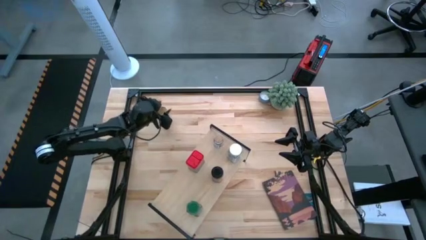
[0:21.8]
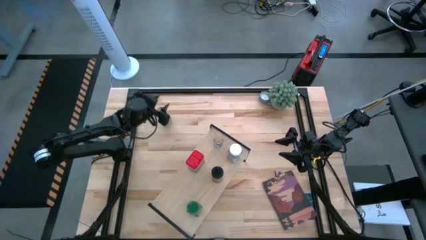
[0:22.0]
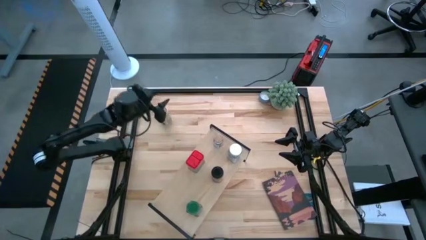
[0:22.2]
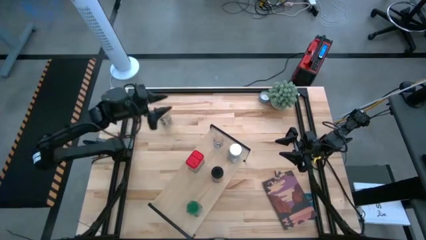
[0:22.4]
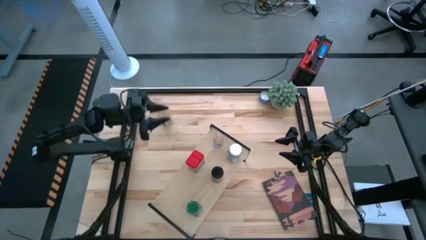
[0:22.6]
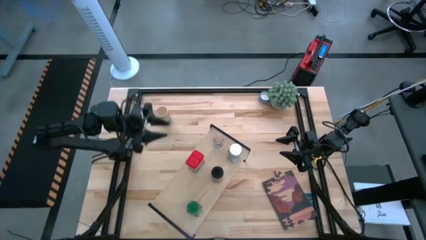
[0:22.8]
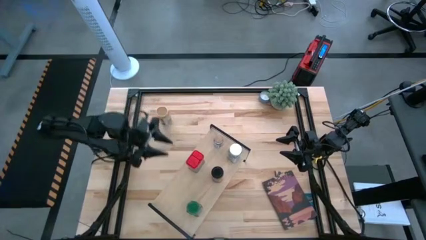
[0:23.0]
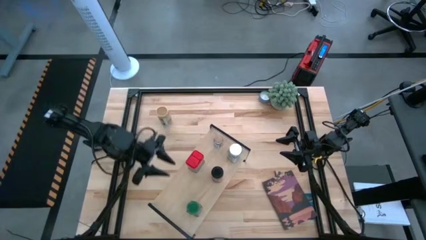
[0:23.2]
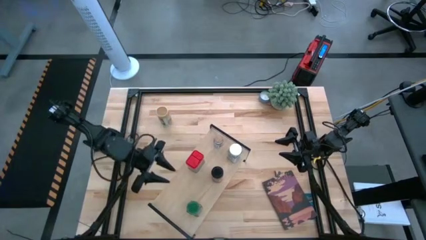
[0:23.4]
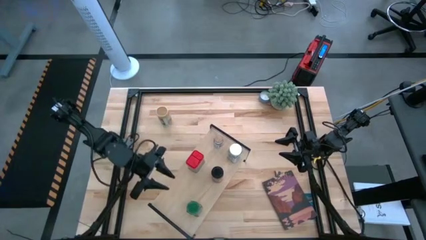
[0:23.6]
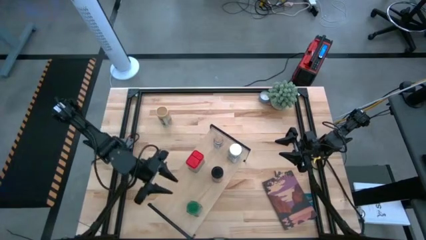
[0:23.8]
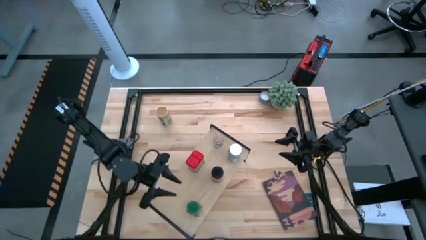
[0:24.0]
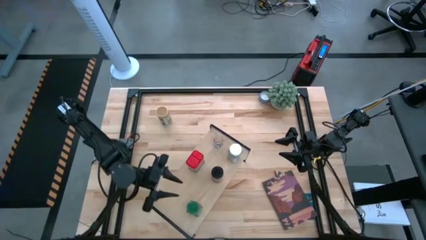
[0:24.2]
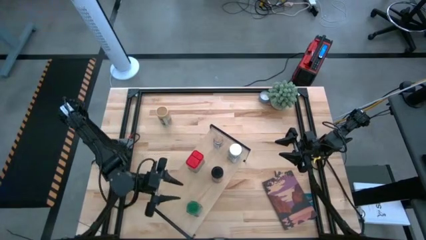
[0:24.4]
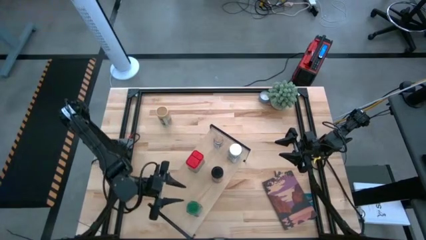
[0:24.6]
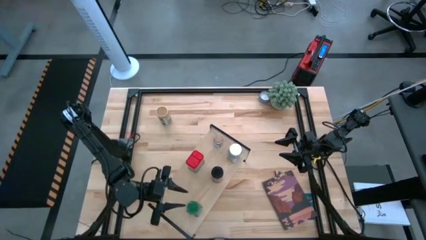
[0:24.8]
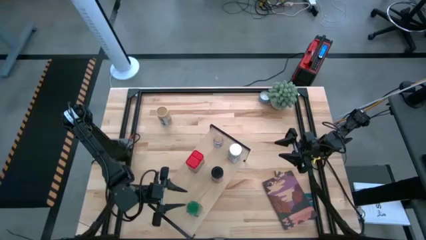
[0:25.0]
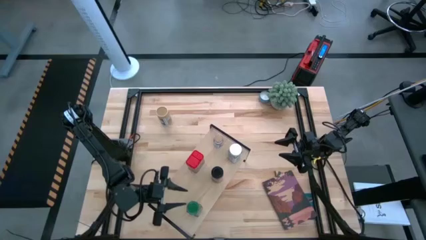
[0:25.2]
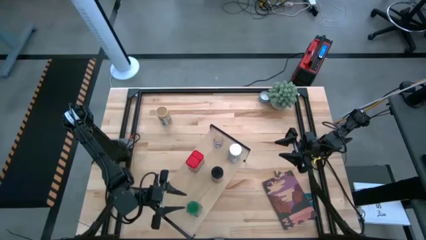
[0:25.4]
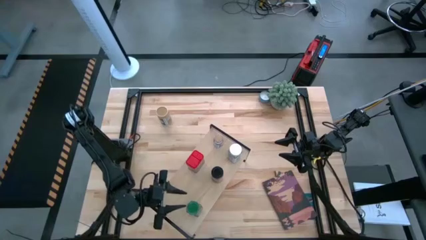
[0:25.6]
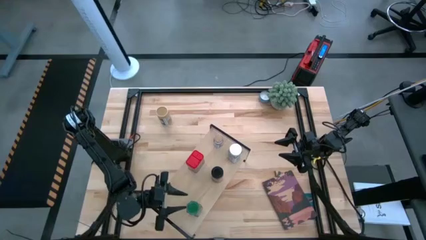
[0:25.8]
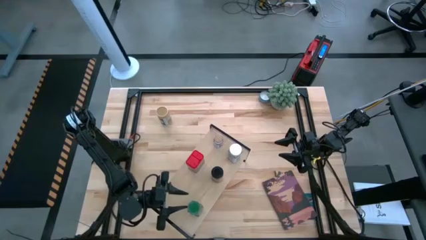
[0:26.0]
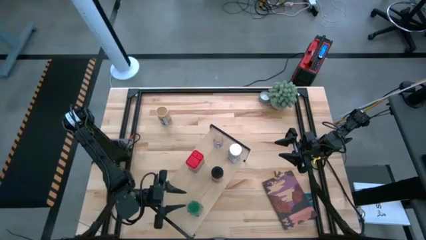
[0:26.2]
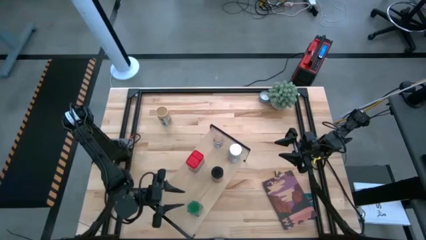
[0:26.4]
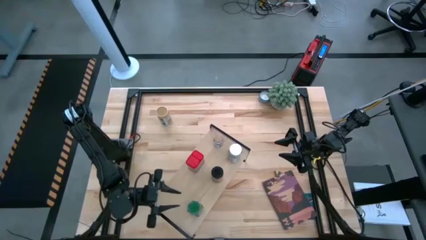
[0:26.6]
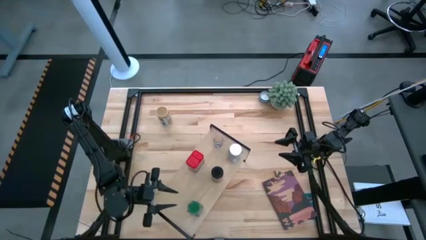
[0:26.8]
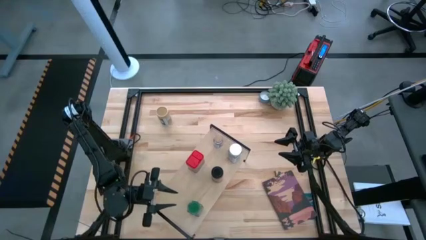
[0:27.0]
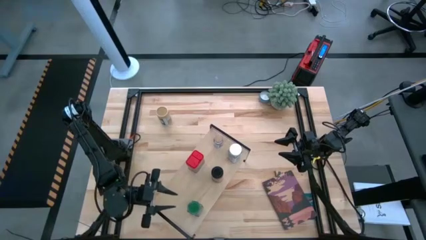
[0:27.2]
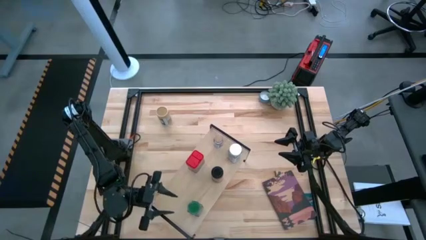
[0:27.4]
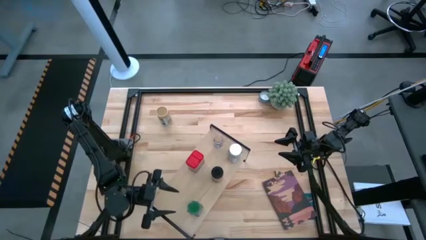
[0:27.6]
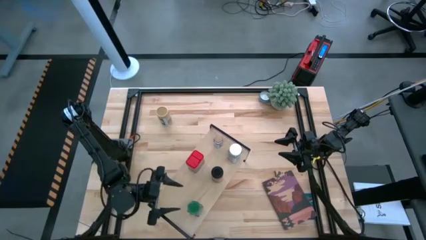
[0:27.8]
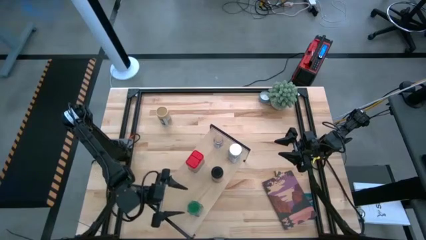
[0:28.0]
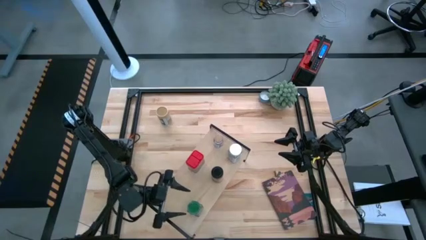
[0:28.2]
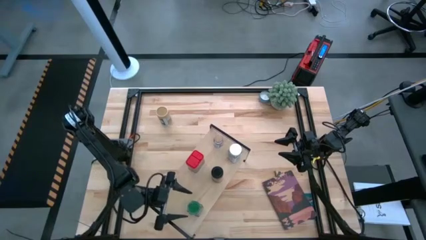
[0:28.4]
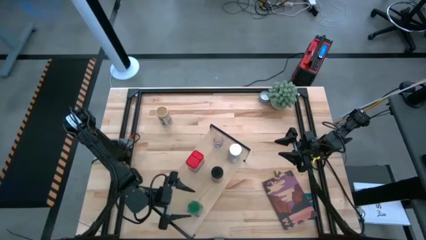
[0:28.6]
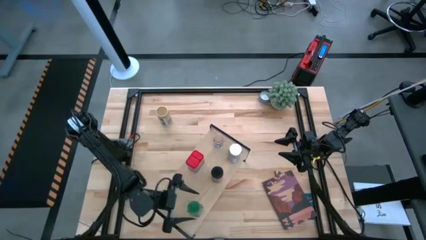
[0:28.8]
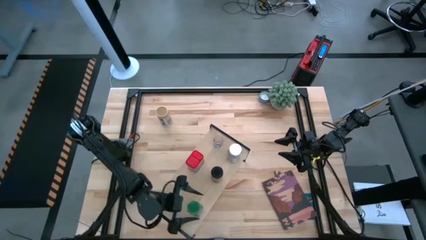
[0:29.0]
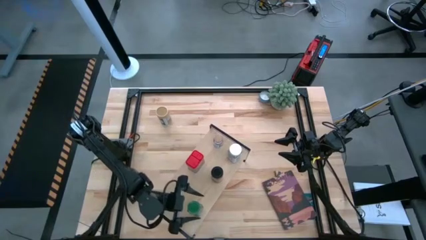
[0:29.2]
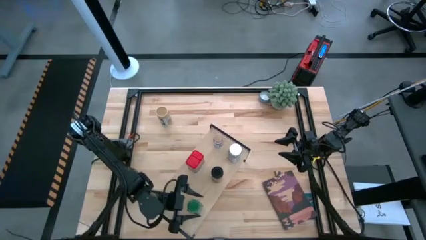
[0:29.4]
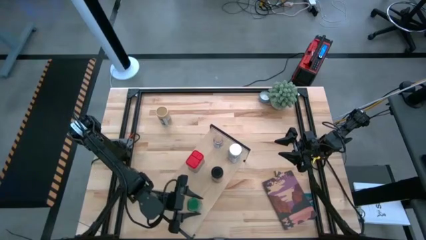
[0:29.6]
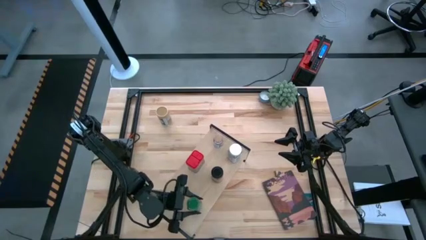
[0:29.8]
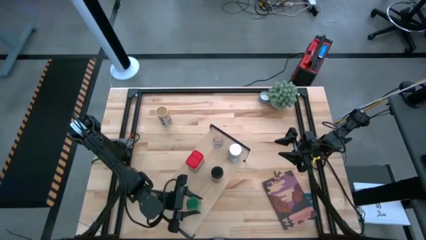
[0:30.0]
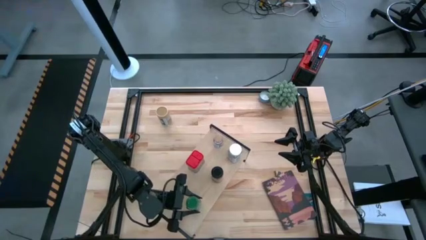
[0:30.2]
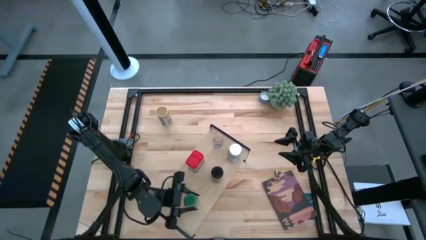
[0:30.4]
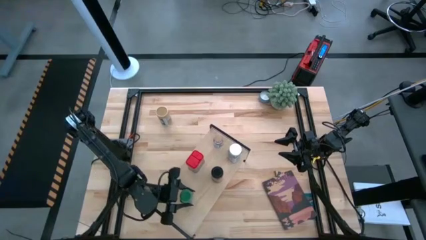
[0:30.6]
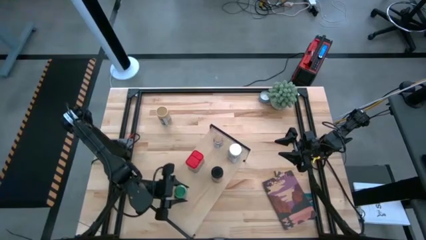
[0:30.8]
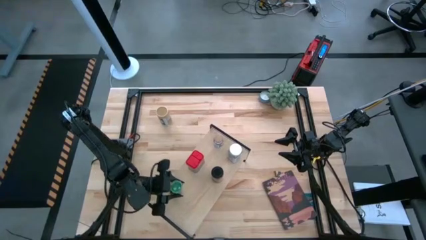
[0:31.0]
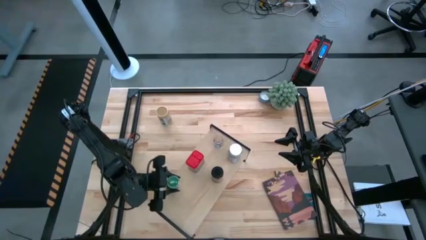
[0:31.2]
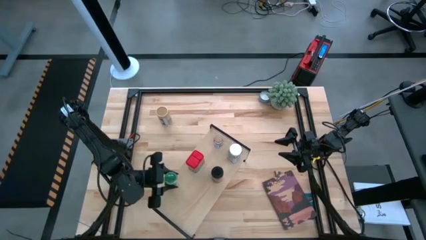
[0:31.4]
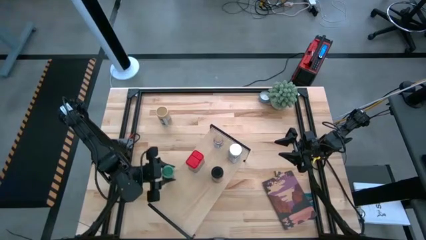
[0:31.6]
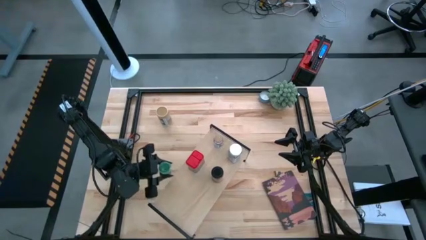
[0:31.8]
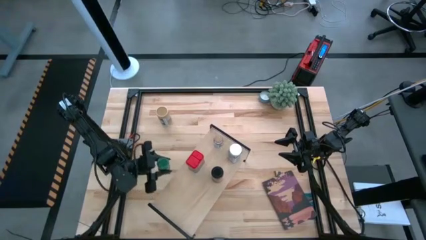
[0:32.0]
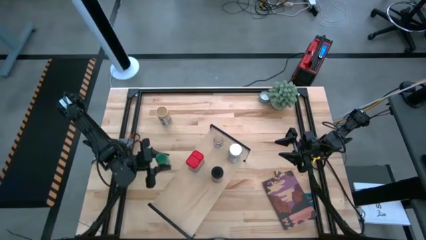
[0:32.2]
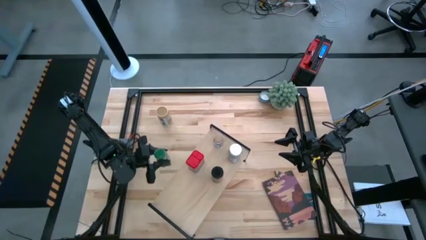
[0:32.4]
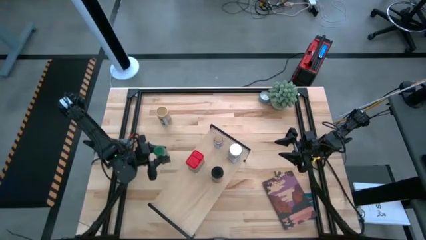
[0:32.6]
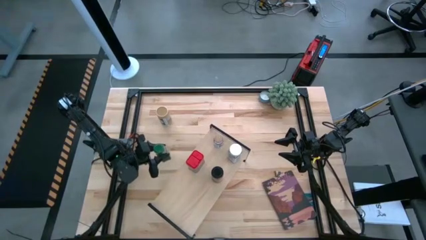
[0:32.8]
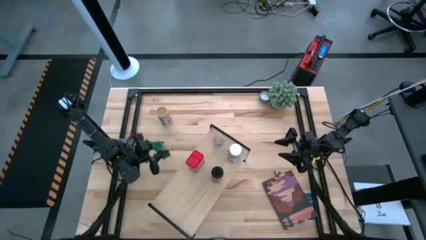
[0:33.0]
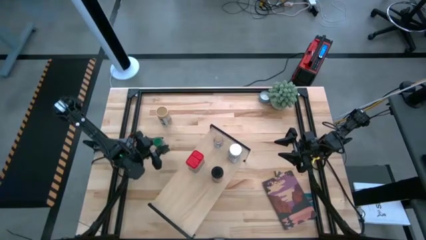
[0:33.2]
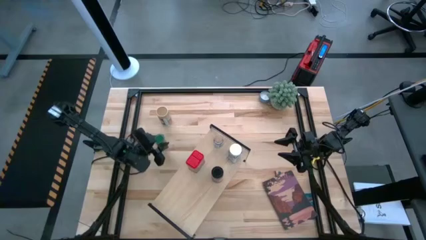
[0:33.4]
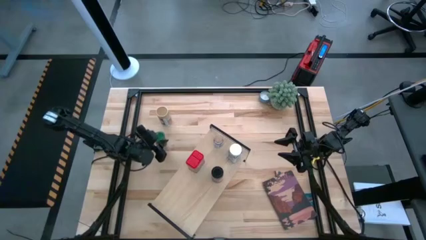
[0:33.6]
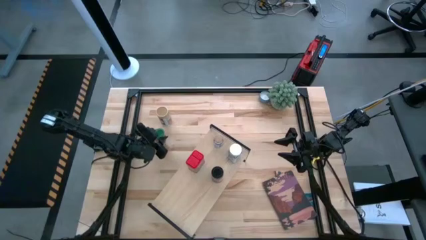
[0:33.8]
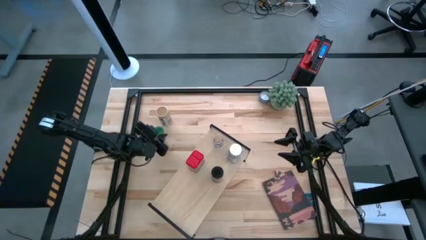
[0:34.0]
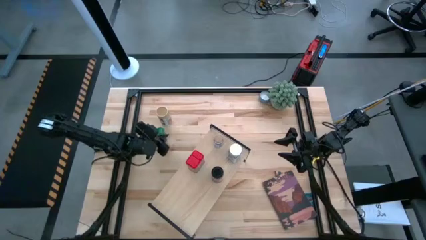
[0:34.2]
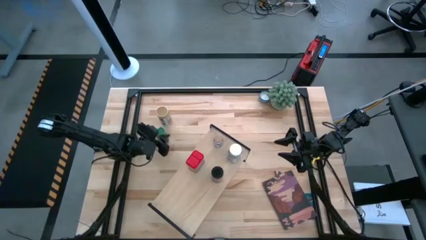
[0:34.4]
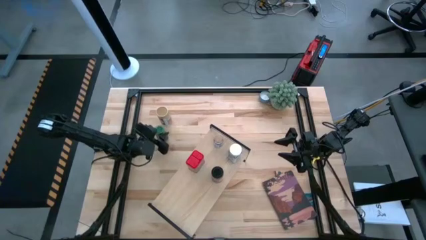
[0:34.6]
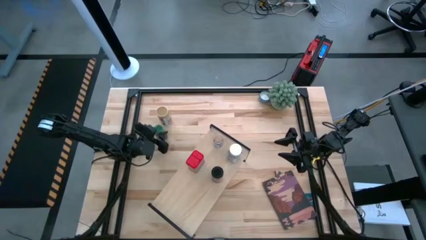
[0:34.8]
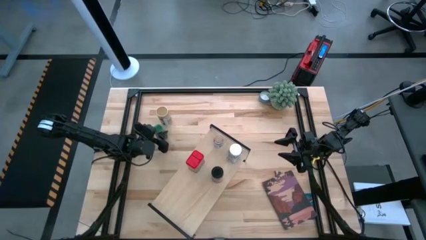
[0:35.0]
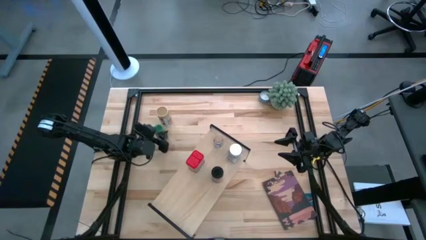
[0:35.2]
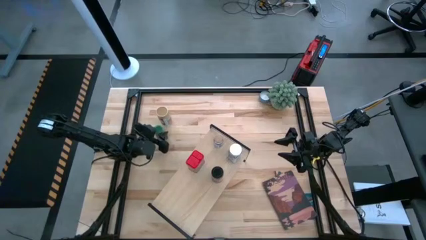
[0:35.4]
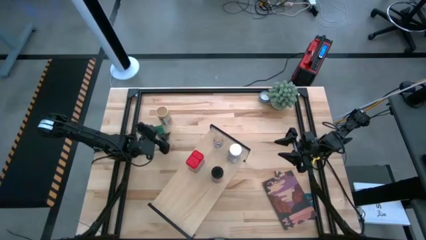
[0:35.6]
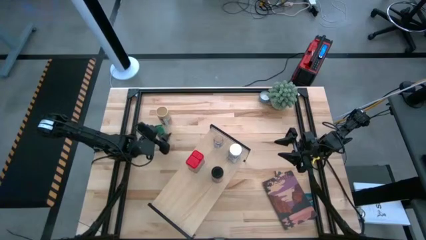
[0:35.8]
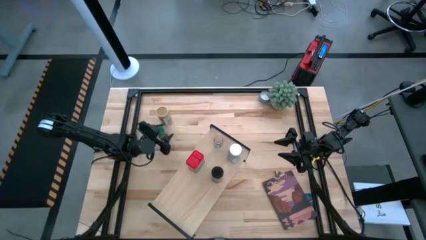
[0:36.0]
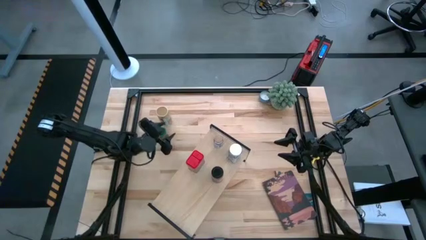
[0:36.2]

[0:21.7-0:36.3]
Task: Shelf spices
Remove the green seasoning bottle from the shelf

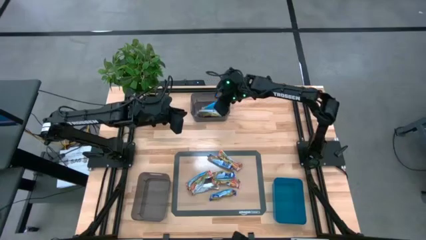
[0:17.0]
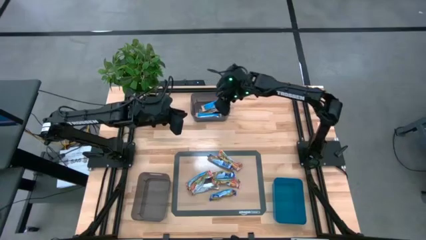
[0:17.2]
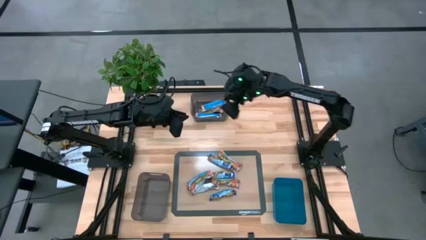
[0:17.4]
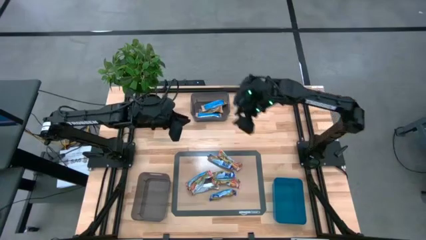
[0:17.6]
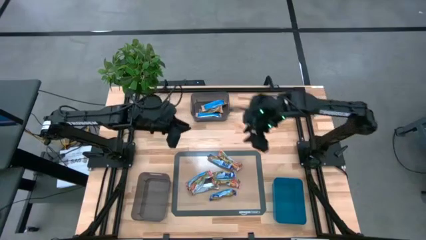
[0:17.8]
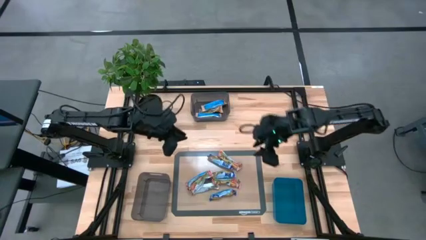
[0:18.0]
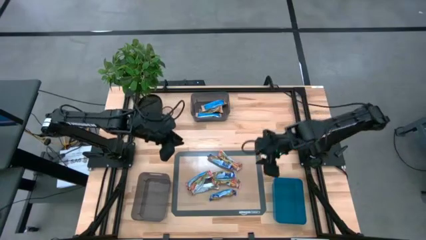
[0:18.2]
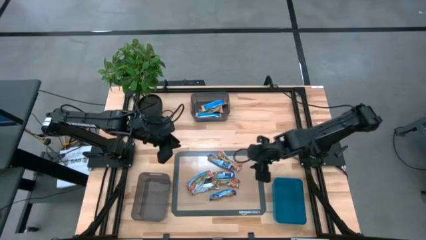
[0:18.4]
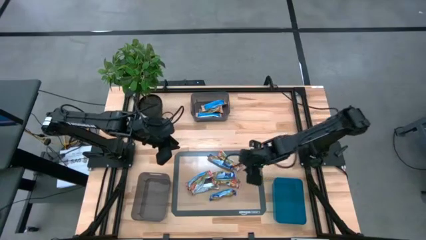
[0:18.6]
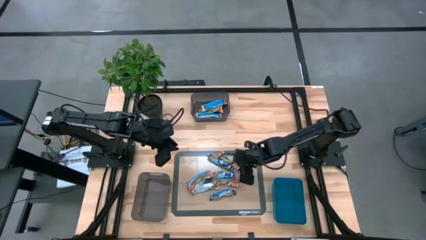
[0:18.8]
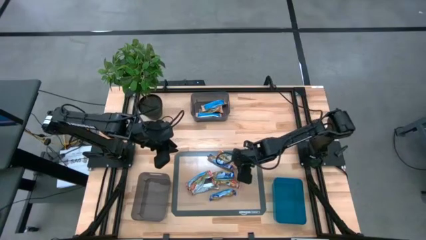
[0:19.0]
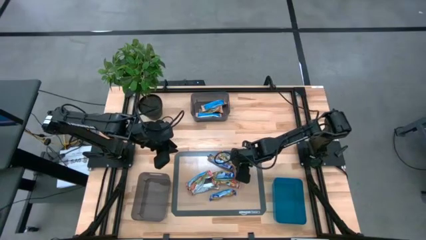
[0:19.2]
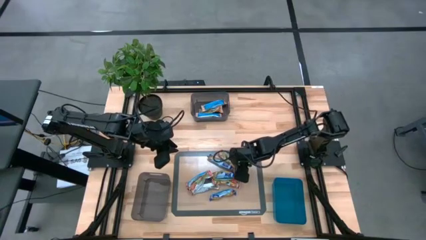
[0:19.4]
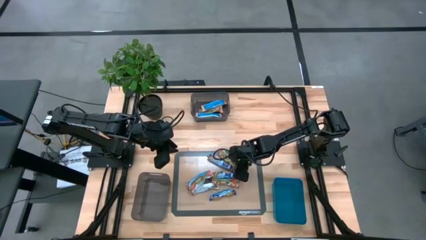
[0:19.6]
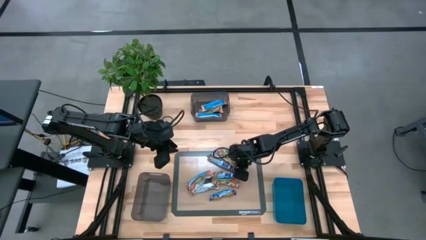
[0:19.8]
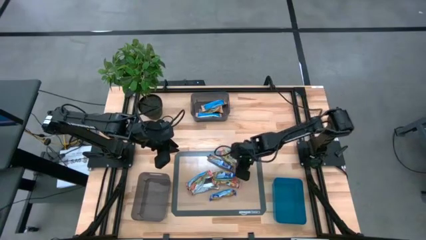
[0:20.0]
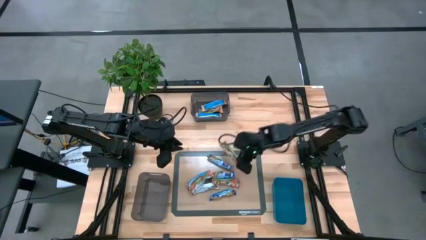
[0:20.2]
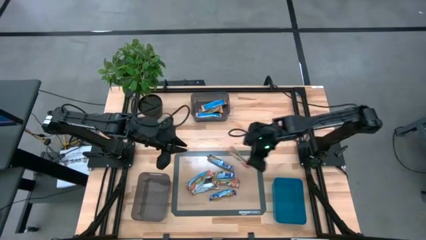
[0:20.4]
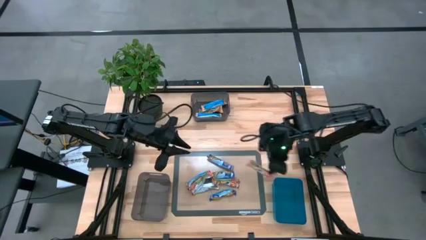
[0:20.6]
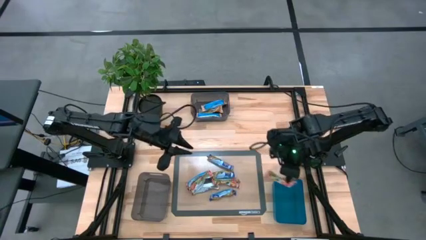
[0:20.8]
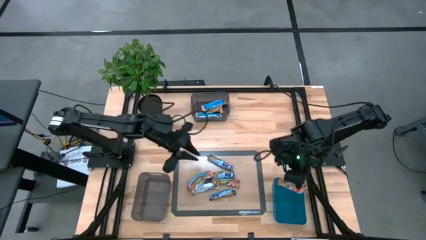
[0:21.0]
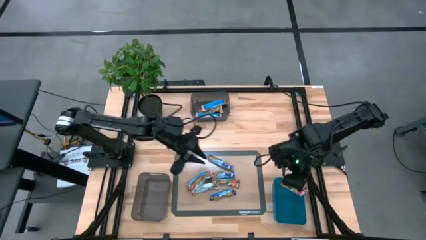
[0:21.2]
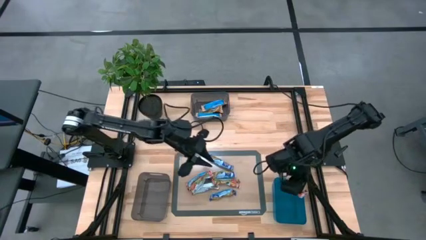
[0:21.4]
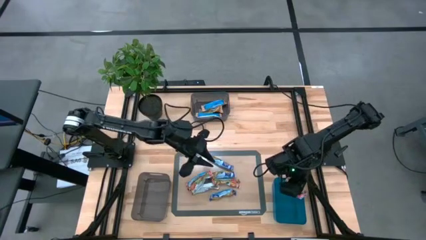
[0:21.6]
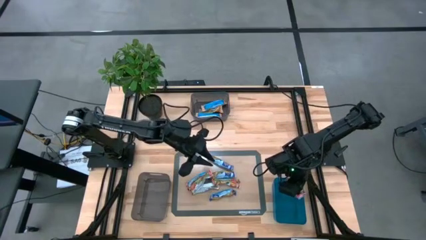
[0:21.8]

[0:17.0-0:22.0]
Task: Pick and place Granola Bars by type
Put the red granola bar into the blue bin
